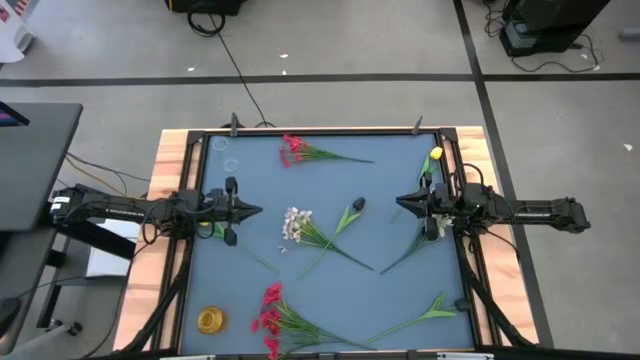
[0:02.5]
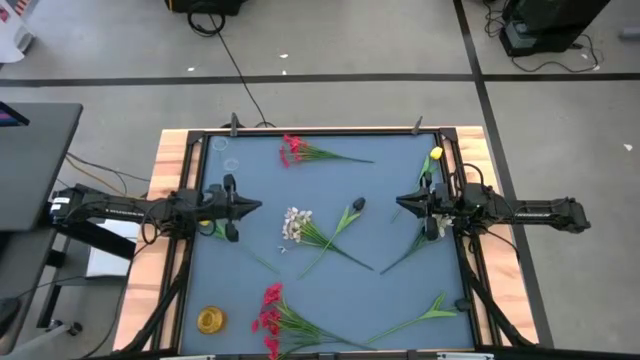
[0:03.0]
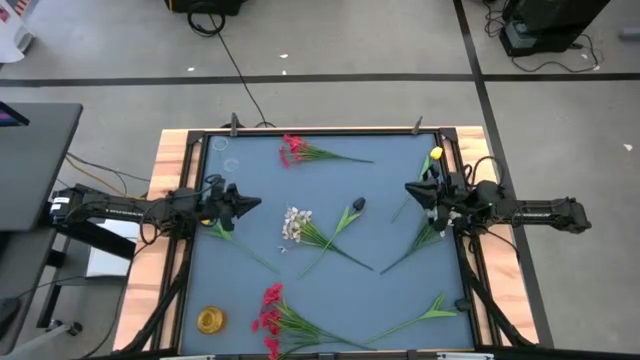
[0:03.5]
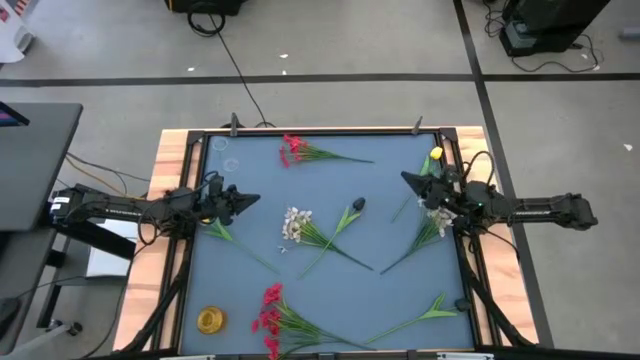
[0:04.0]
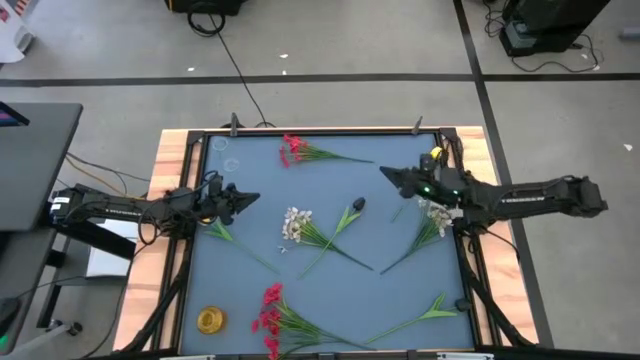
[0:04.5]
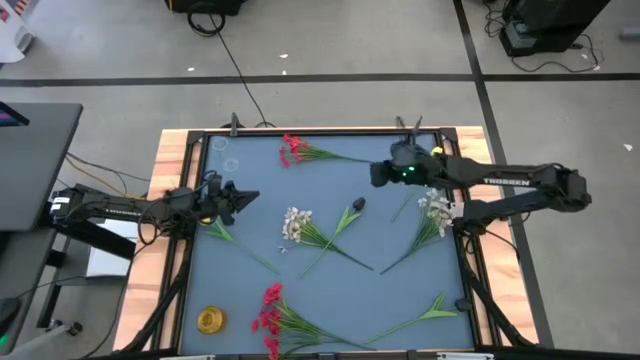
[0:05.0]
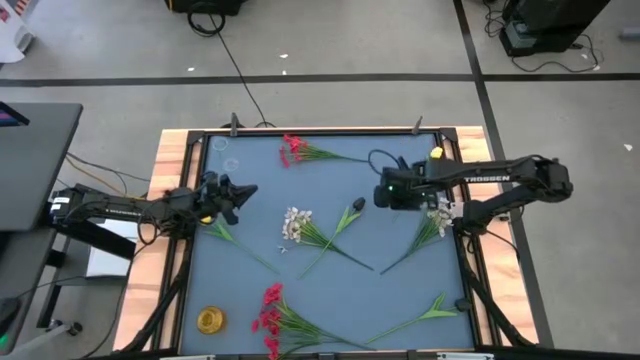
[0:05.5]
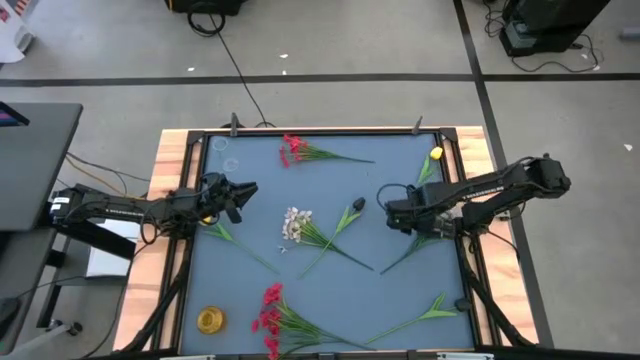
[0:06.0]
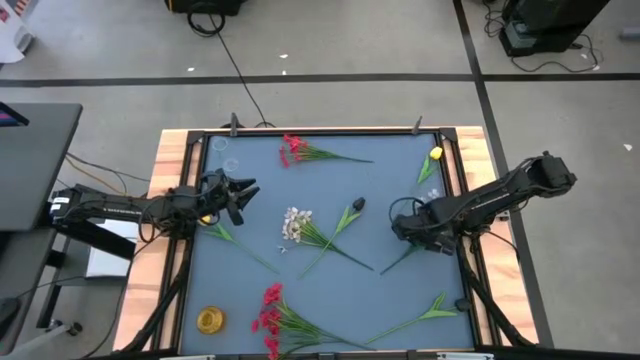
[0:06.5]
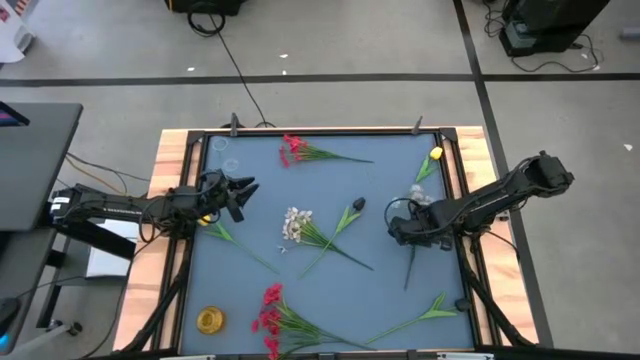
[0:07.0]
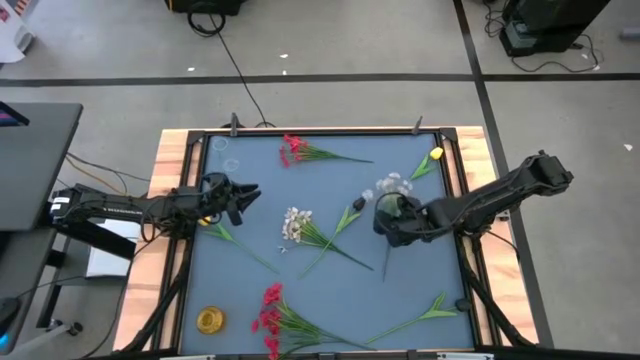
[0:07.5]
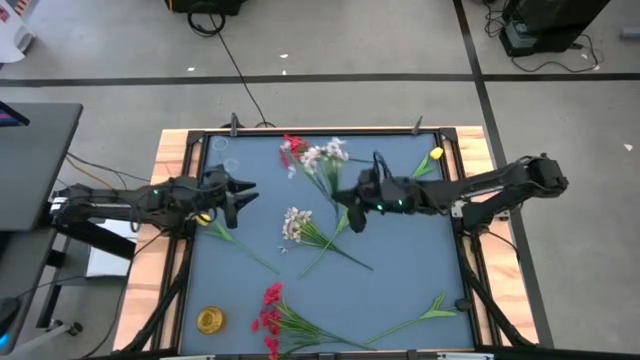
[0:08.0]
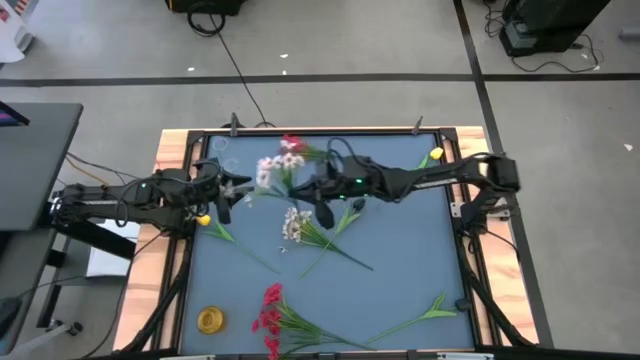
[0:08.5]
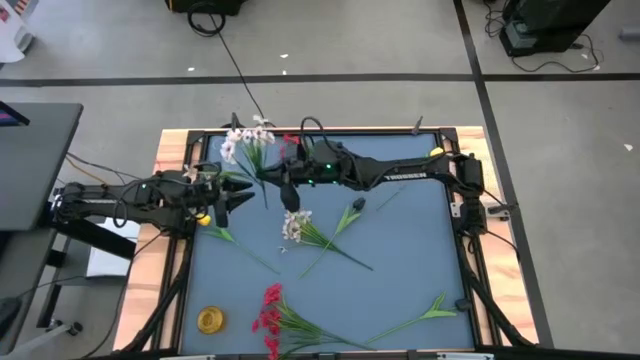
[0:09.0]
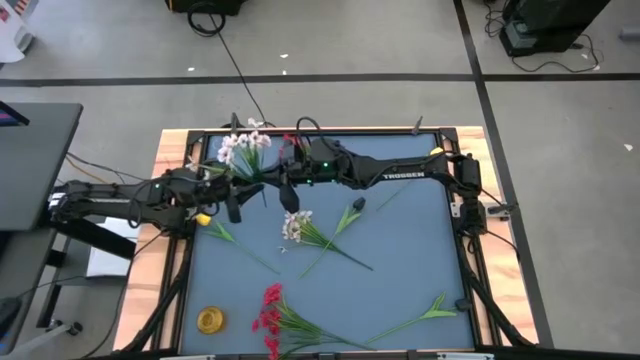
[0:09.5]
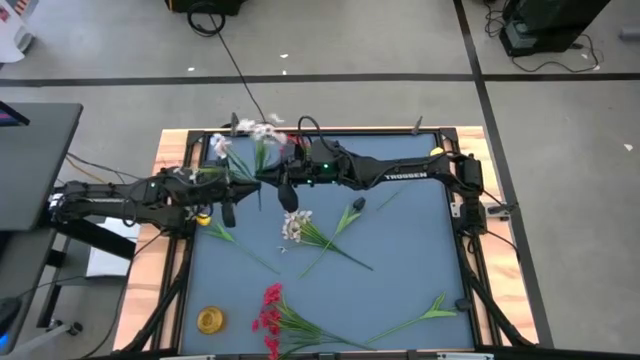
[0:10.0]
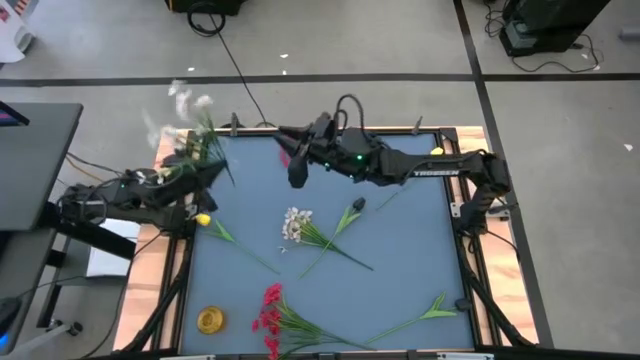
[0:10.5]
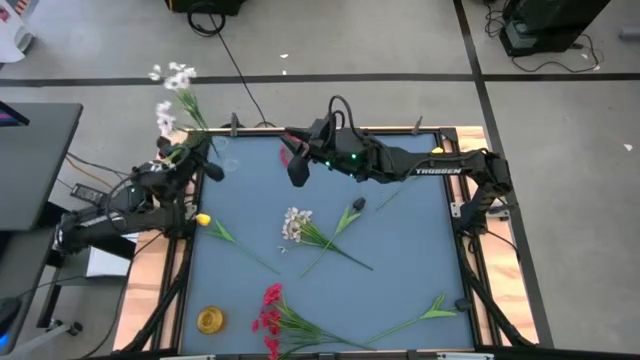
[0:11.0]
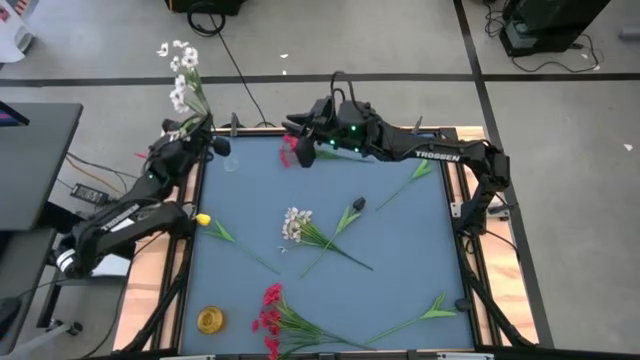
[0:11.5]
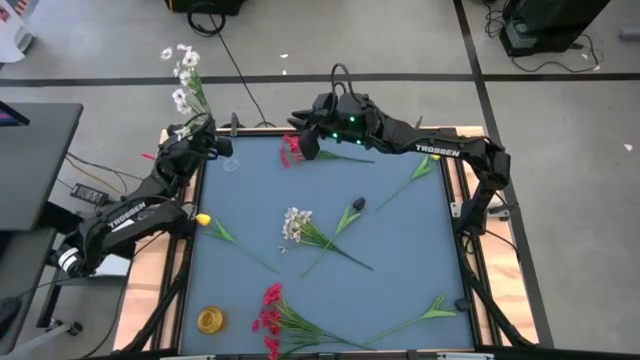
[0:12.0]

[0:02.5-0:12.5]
Task: Sort flowers into vase by color
Put the right white flowers into the transparent vase

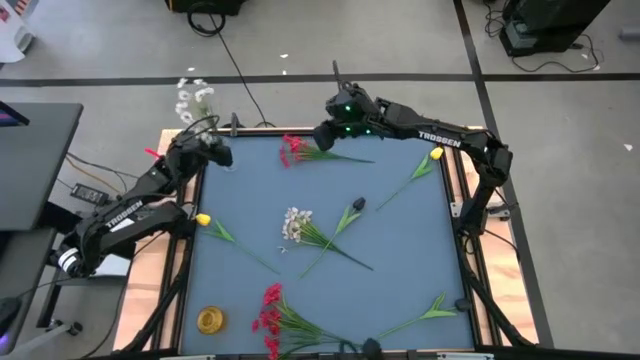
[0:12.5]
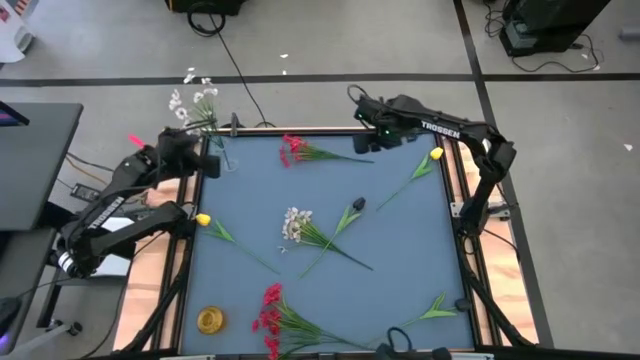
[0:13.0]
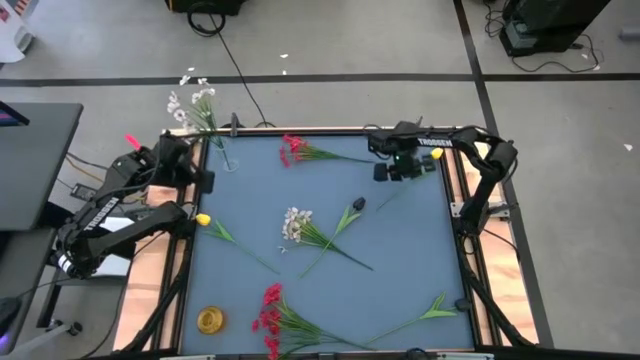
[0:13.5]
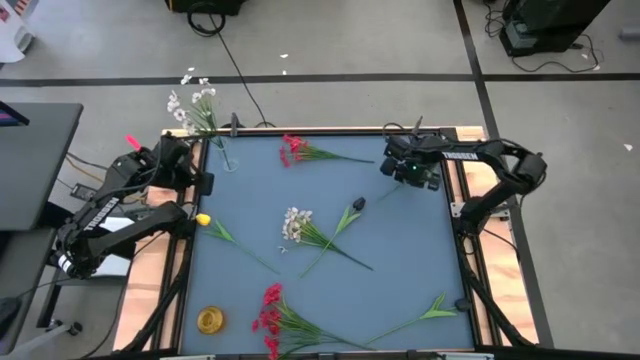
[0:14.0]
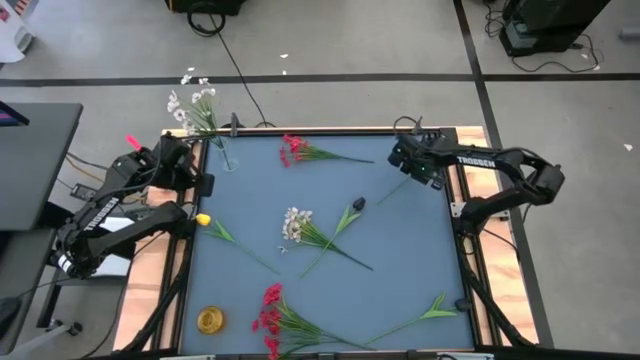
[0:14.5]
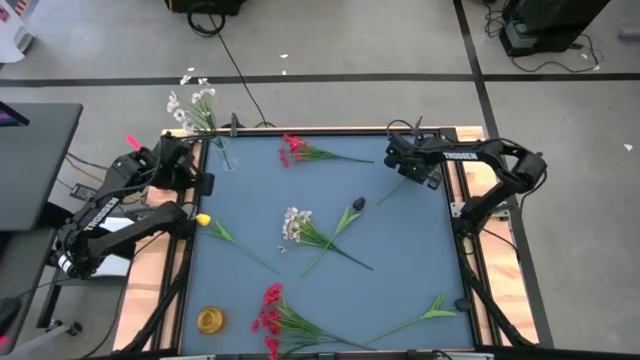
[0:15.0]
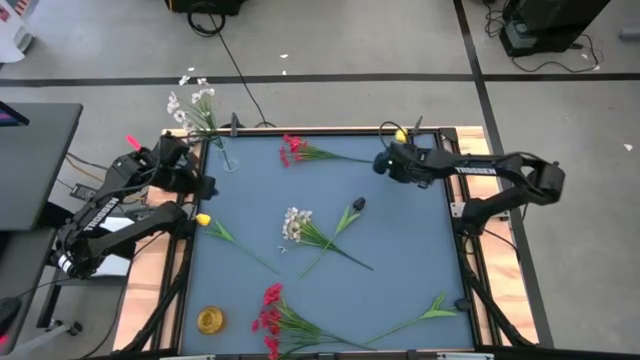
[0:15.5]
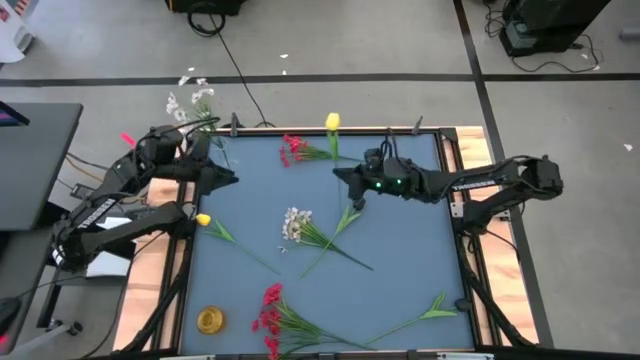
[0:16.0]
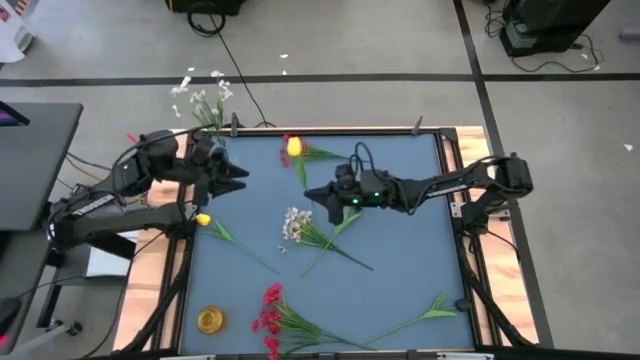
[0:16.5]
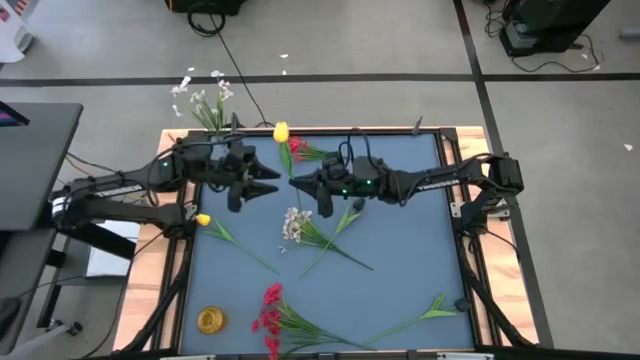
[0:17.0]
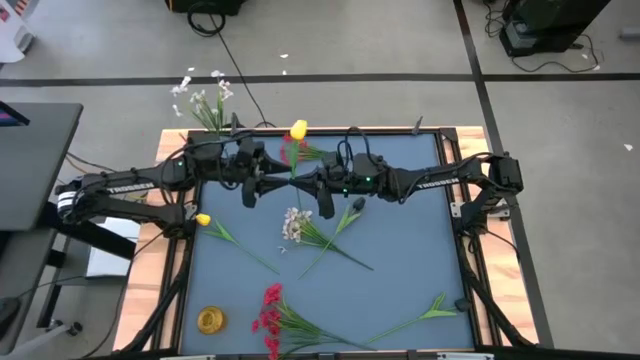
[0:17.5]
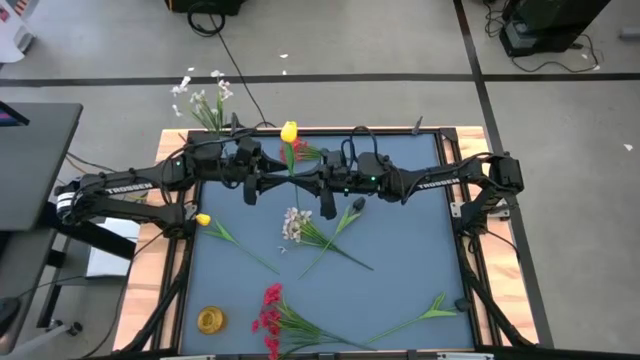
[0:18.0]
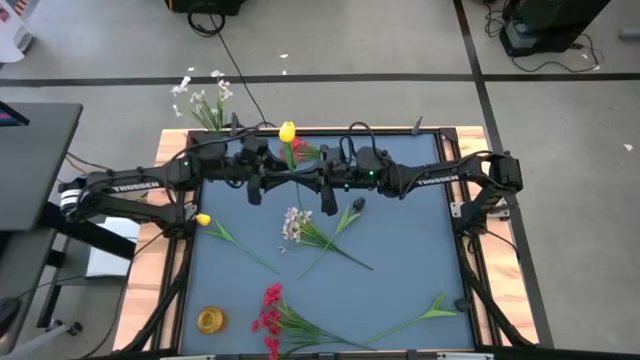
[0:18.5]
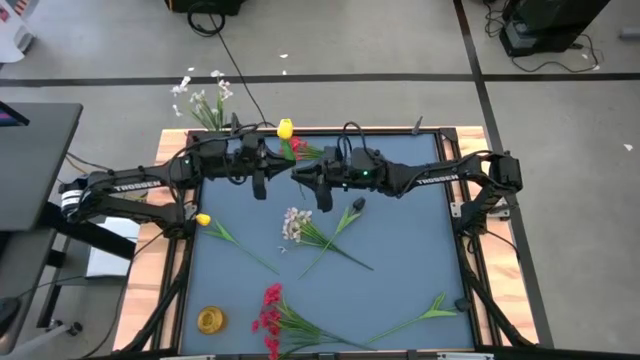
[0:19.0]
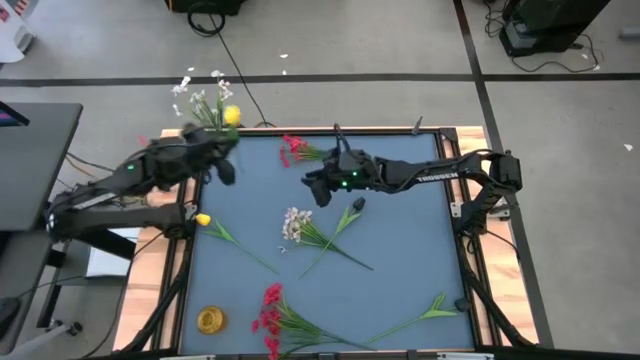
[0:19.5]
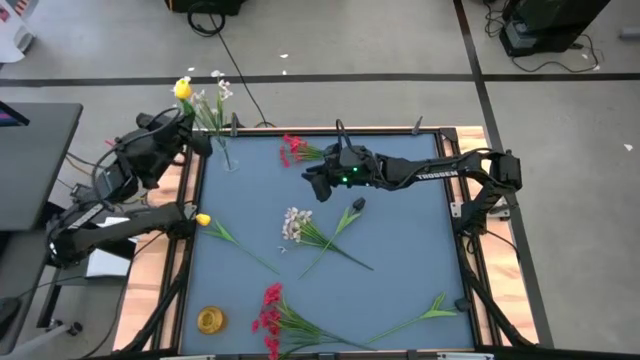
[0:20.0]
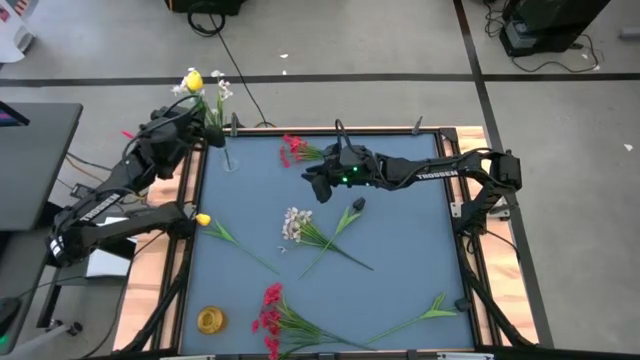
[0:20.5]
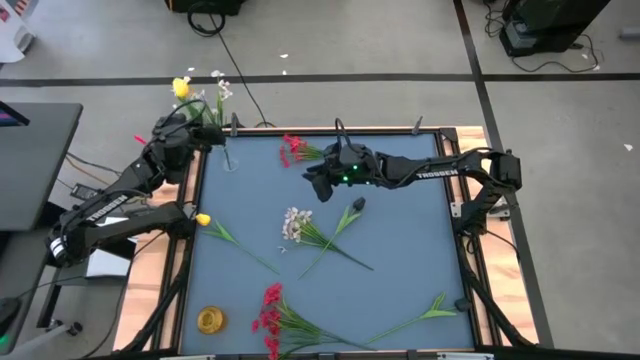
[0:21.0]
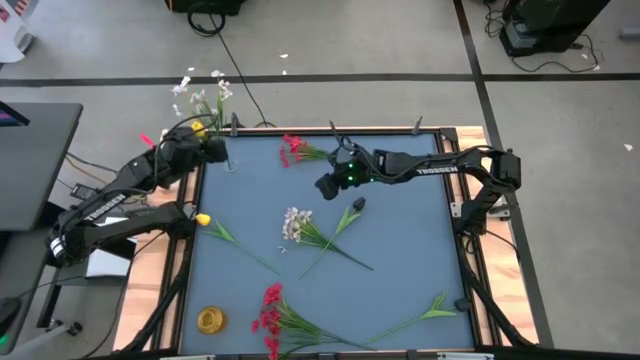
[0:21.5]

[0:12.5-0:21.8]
Put the right yellow flower into the transparent vase
